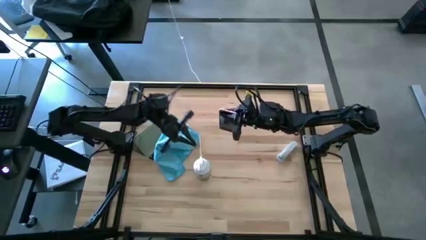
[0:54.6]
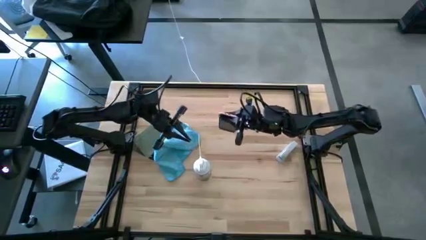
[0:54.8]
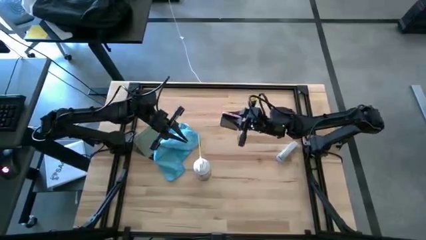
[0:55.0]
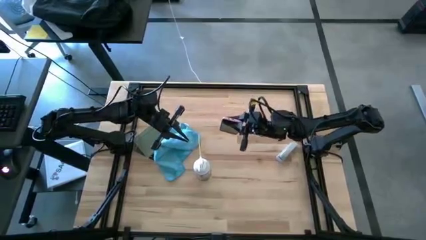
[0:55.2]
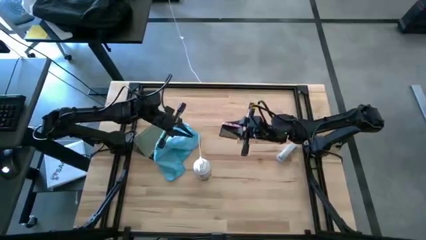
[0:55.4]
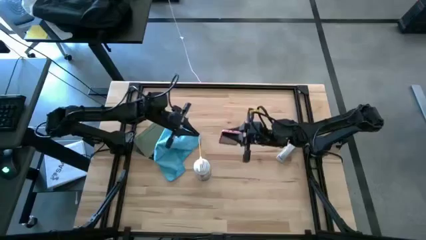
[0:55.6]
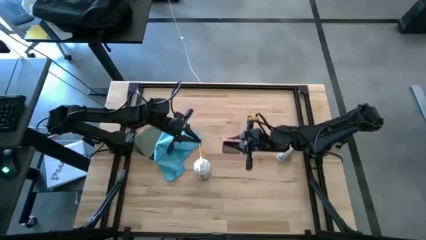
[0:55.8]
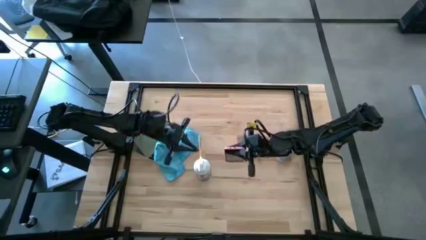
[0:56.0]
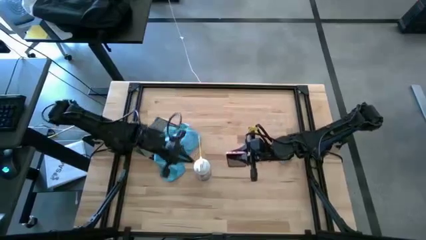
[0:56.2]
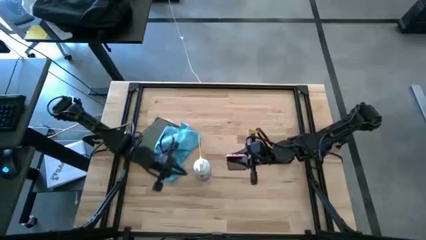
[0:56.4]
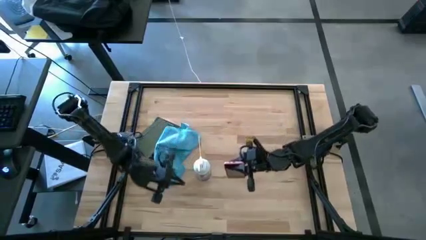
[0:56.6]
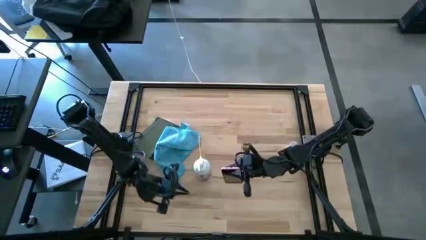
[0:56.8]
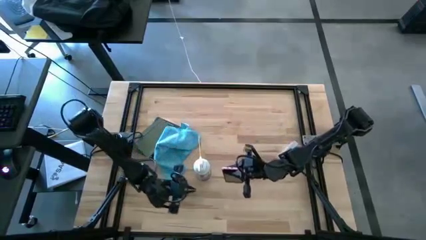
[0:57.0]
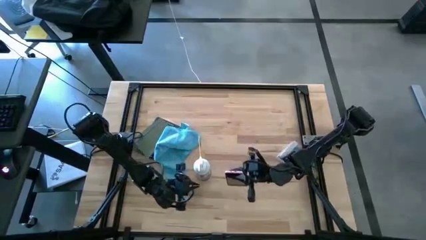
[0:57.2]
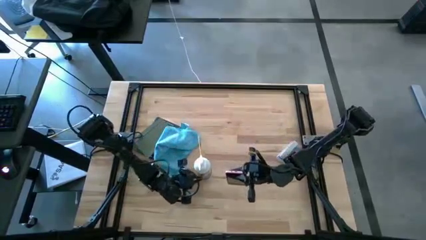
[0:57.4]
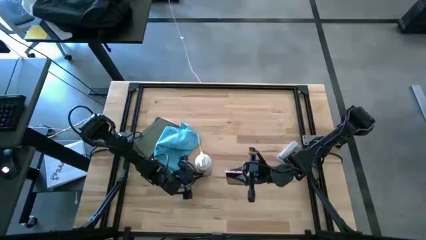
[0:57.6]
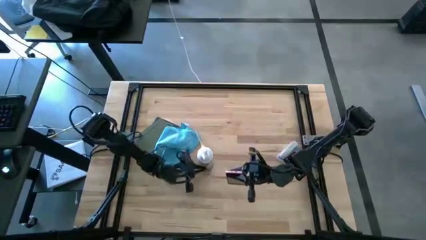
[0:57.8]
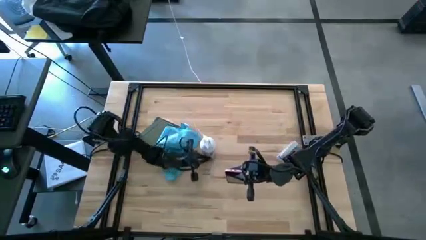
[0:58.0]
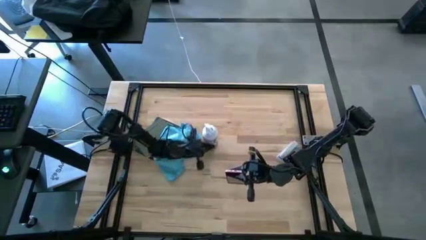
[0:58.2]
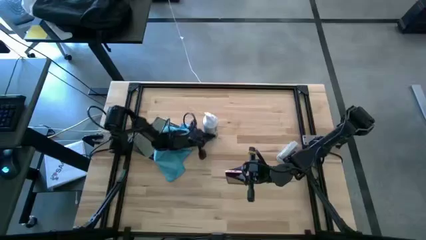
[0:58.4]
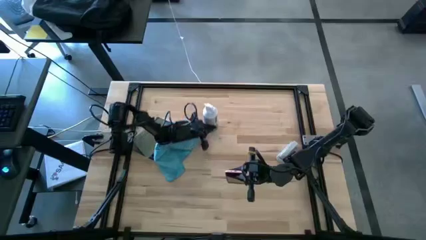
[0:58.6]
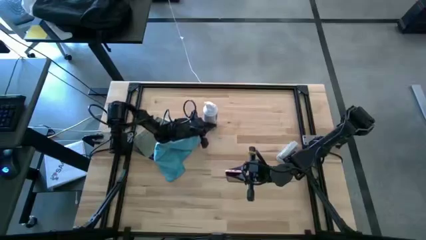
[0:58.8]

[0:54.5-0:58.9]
Task: Apply microfiber cloth
Move the spray bottle cleaner to the top of the table

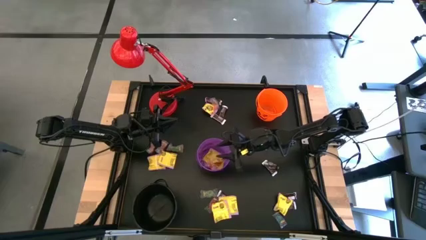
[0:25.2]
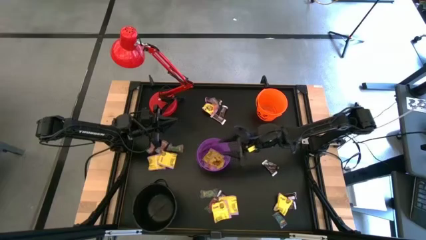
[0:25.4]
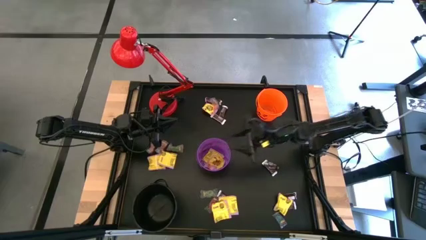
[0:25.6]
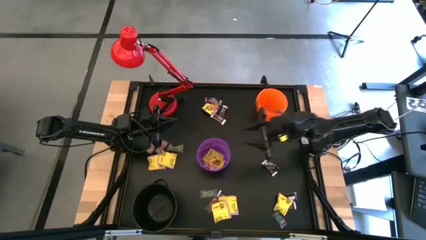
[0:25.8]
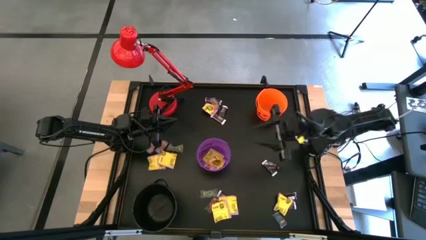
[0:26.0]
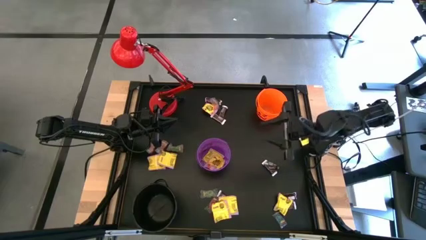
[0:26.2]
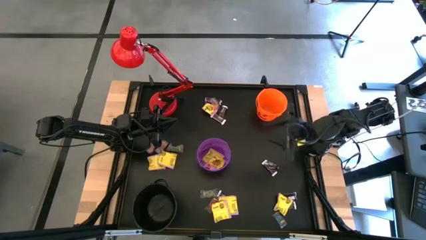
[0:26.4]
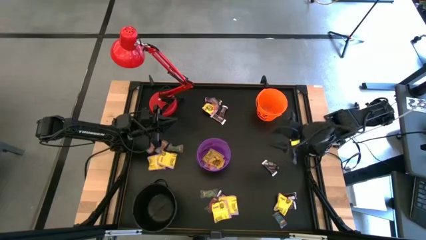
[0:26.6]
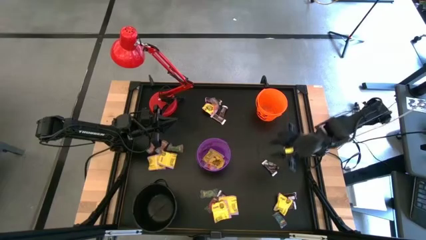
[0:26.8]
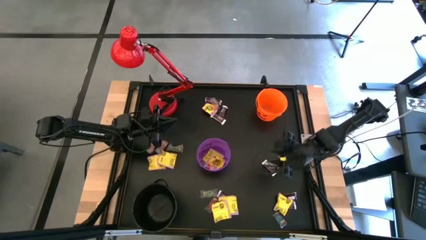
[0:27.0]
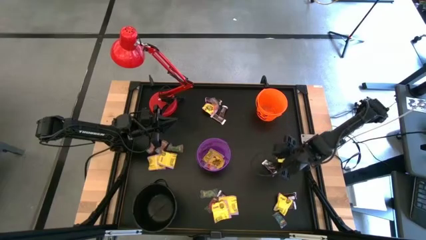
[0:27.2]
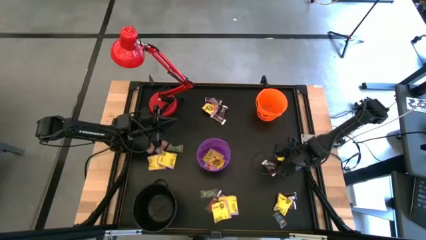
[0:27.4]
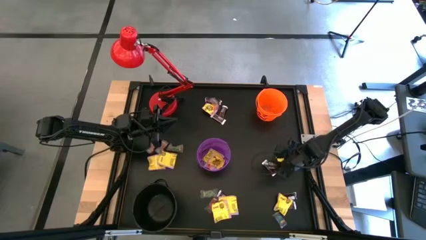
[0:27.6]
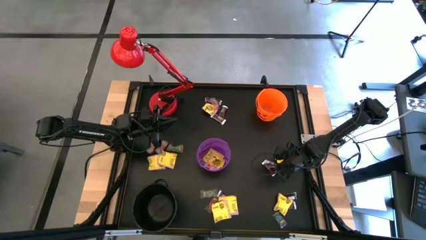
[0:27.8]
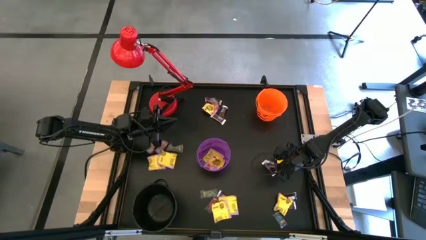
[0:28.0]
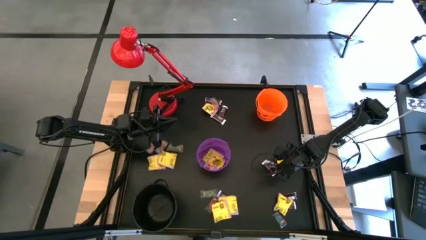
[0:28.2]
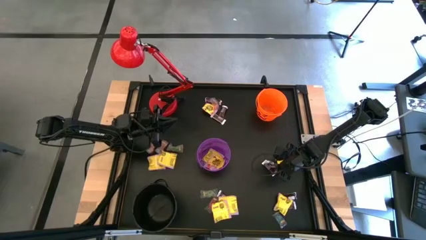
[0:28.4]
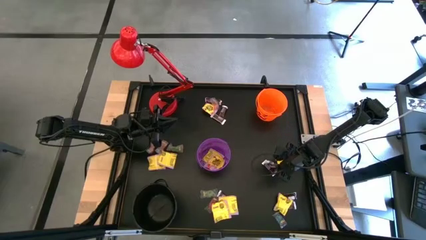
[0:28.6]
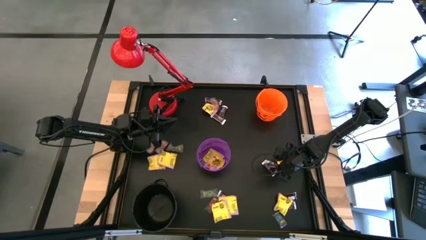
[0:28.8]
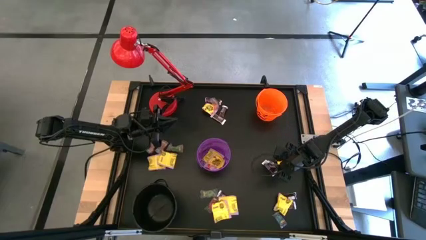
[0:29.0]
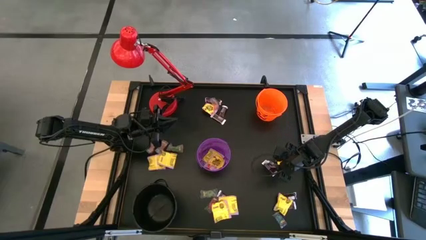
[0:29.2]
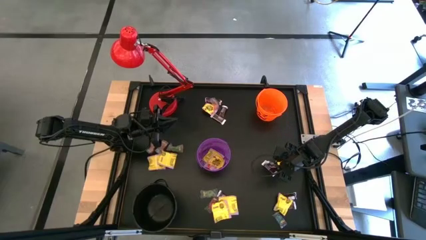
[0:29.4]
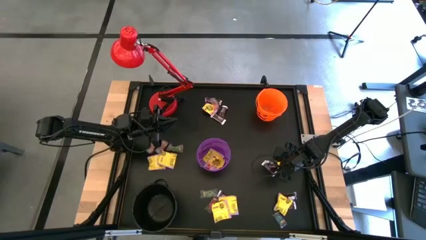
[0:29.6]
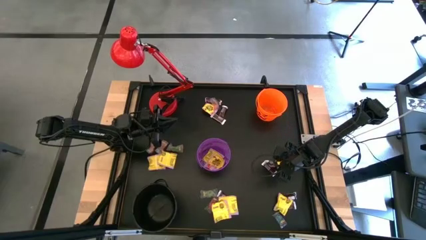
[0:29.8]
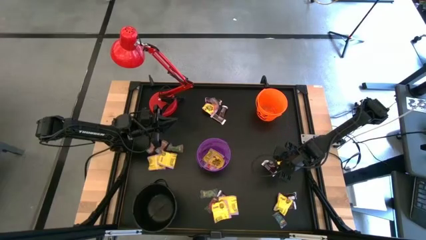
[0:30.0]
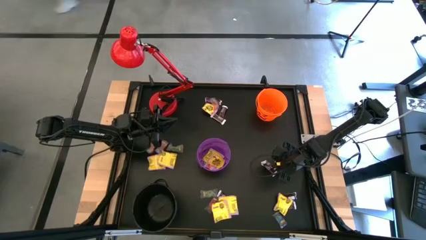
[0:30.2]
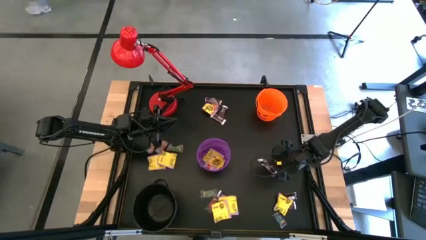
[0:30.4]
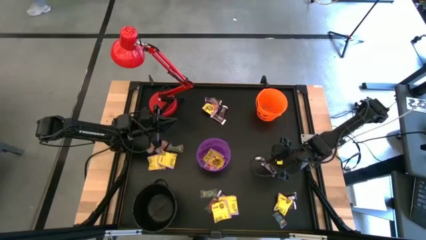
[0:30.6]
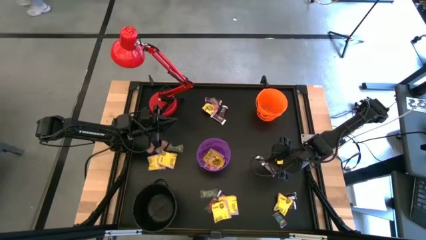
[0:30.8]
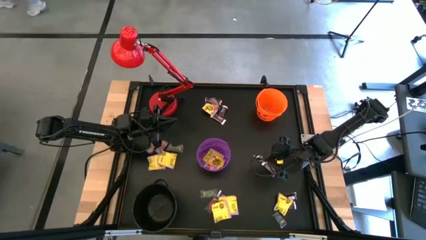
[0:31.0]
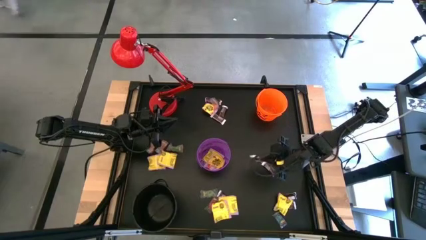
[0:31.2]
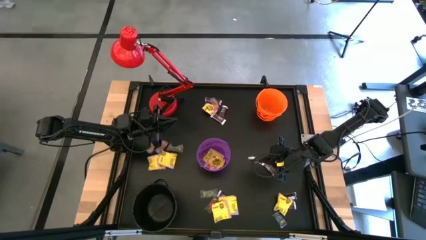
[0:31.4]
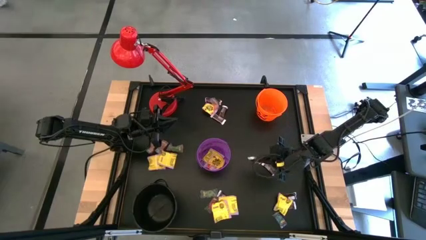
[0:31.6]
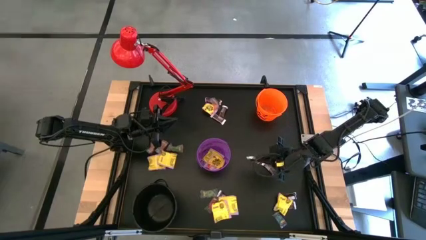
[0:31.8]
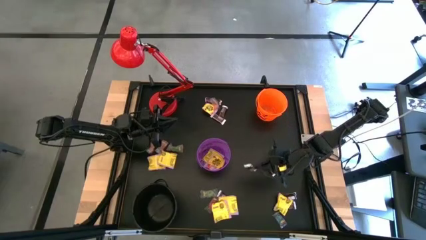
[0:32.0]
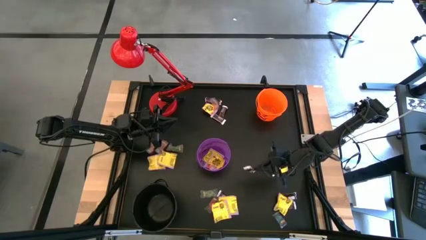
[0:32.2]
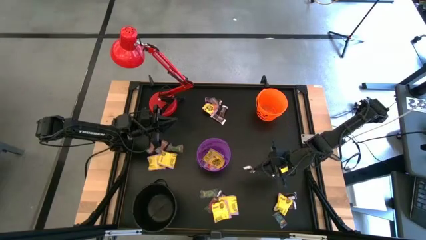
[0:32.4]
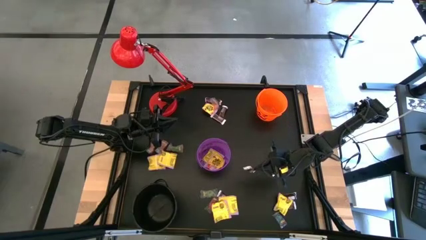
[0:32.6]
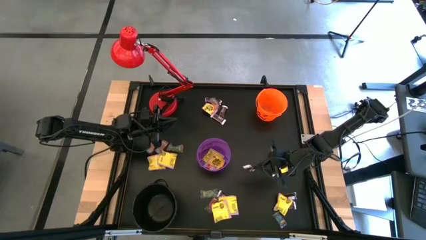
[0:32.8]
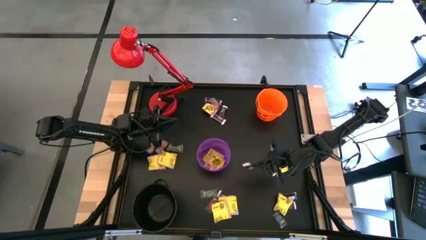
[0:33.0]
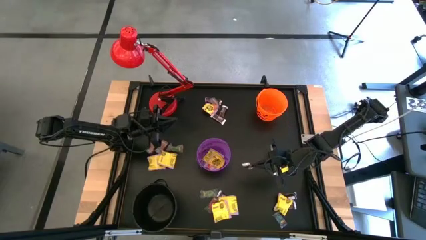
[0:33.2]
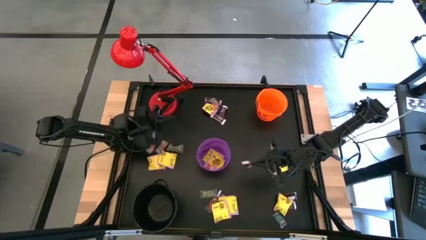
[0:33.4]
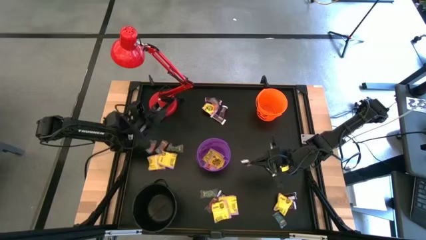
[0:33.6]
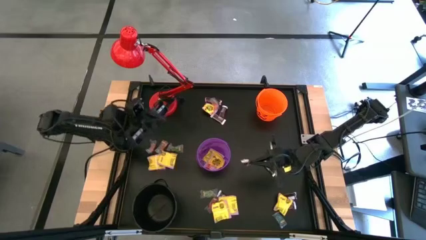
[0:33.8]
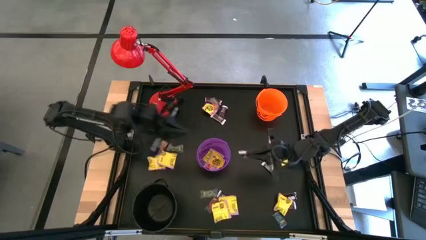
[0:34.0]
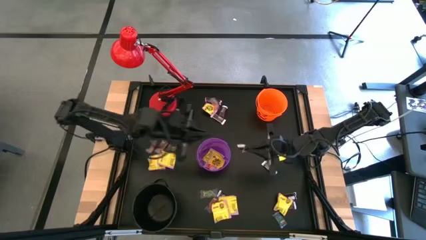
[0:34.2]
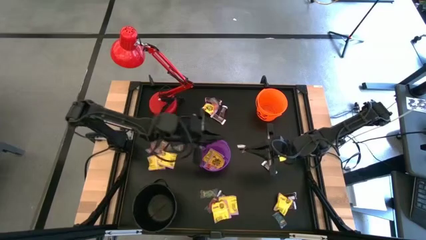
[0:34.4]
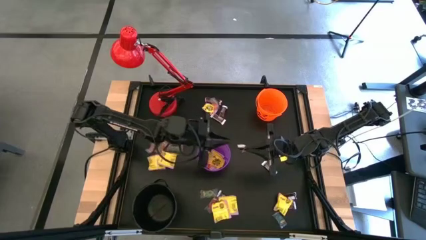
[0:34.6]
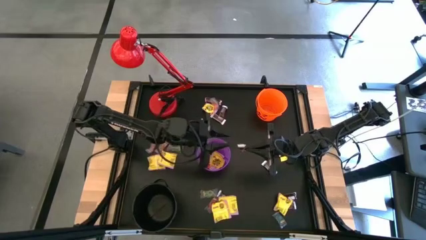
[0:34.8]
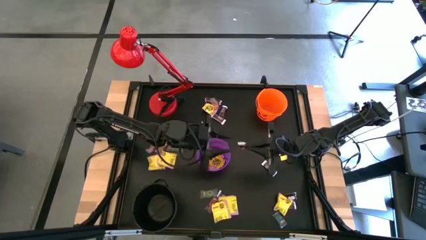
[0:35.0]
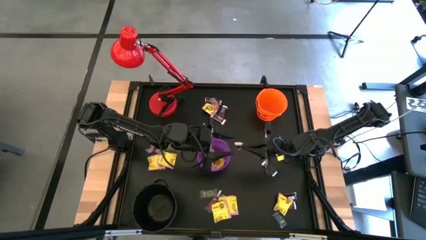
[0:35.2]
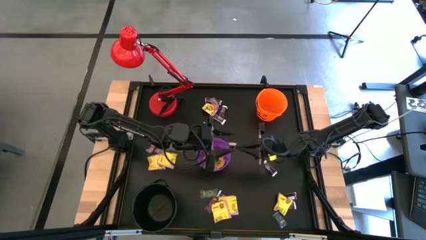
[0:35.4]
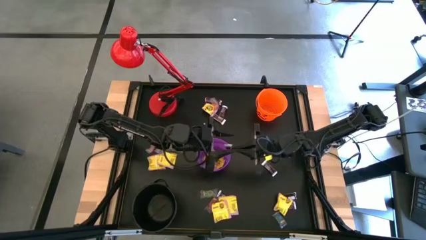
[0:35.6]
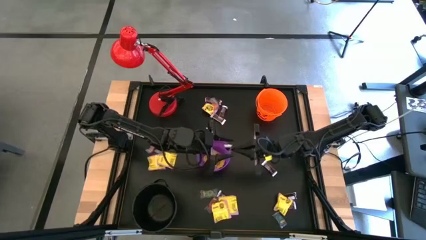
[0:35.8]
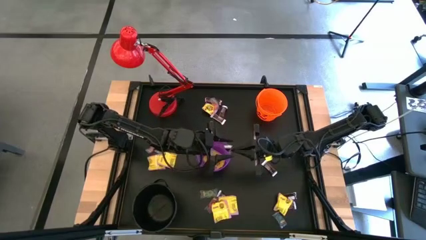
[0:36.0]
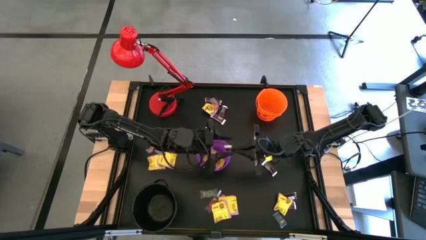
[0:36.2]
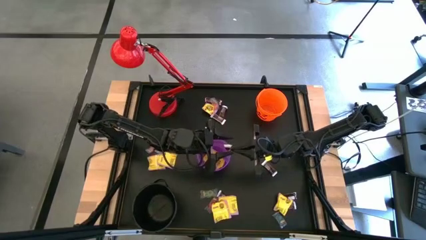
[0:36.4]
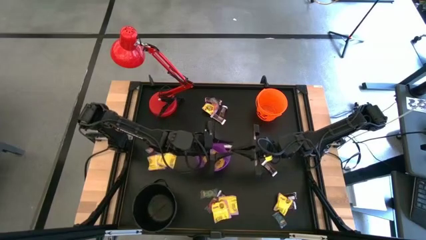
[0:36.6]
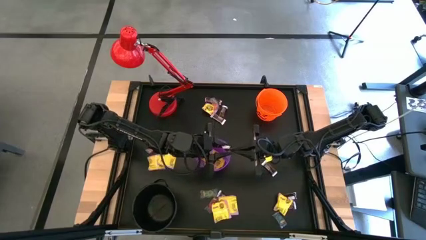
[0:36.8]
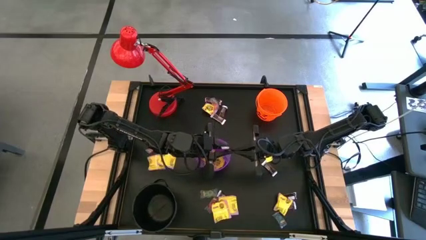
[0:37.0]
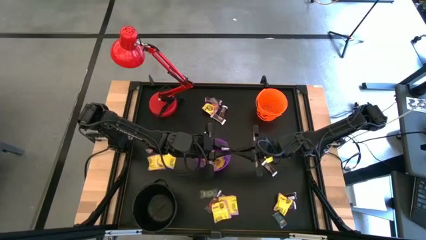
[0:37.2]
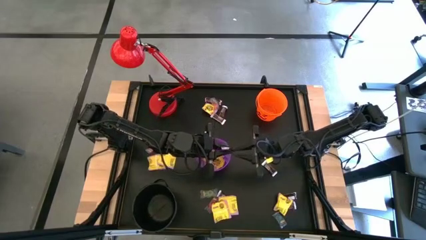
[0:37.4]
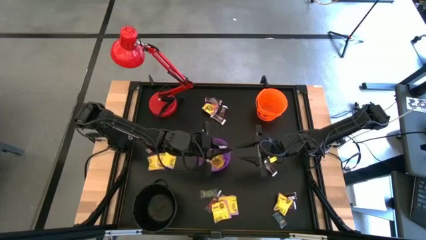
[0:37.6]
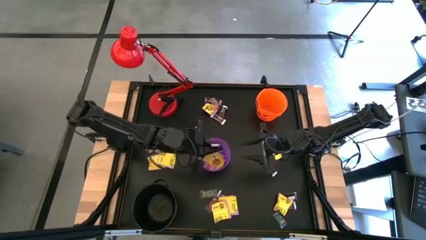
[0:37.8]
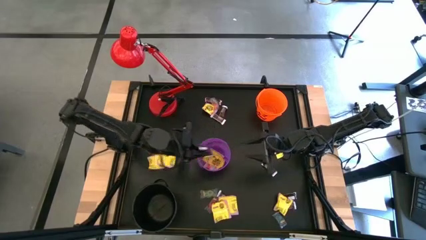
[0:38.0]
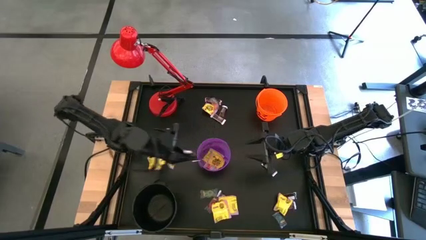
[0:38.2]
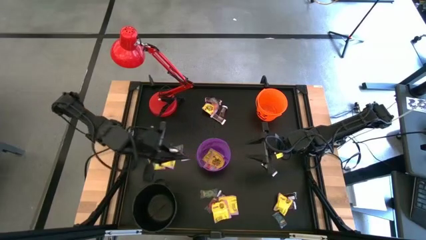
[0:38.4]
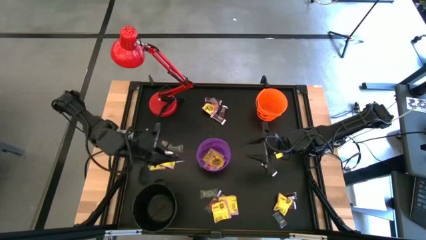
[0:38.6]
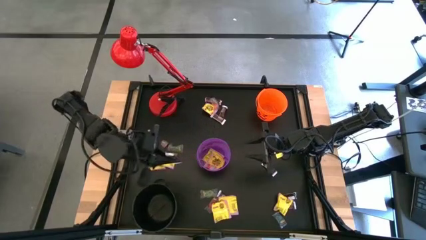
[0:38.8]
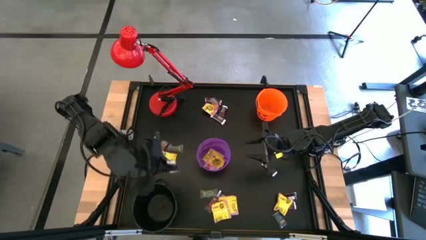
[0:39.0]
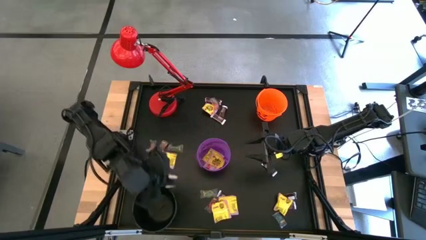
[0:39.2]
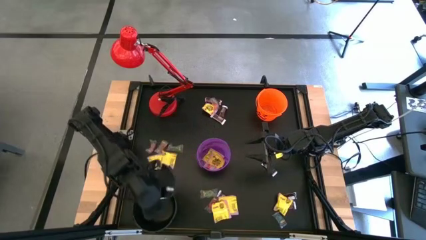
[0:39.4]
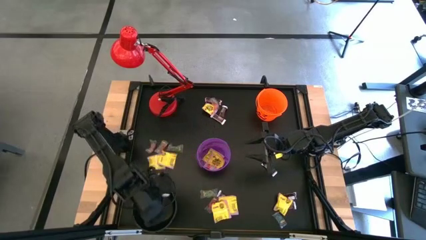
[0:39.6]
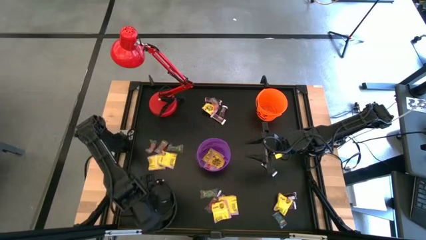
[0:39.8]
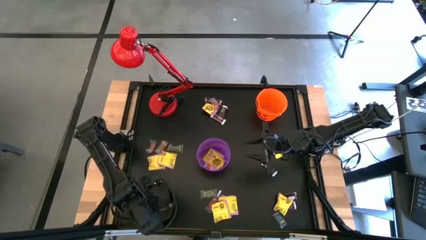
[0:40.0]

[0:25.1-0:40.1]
Task: Sort candy
Put the brown chocolate bar into the black bucket
